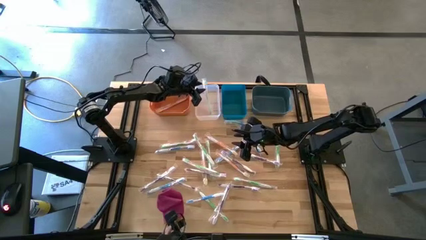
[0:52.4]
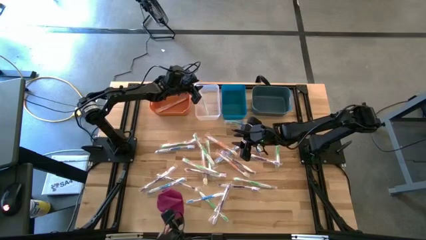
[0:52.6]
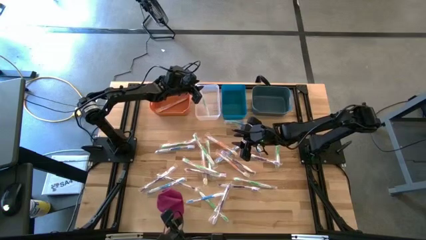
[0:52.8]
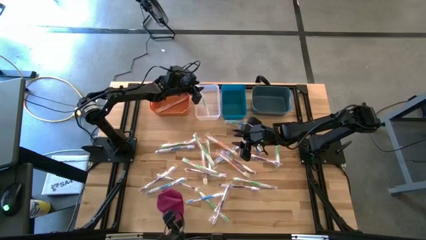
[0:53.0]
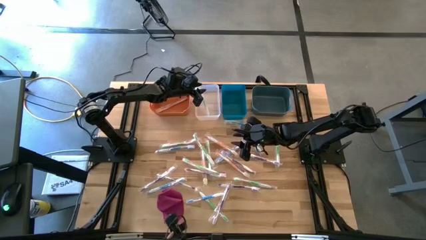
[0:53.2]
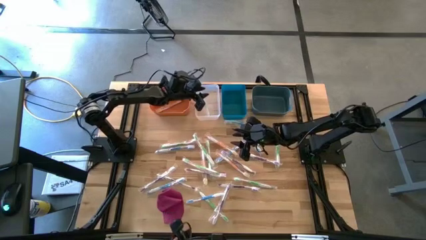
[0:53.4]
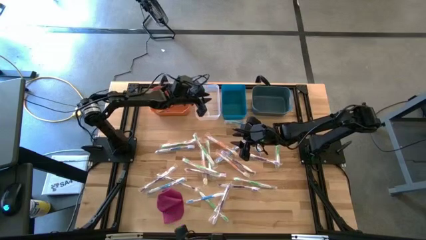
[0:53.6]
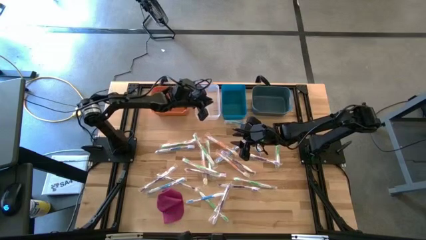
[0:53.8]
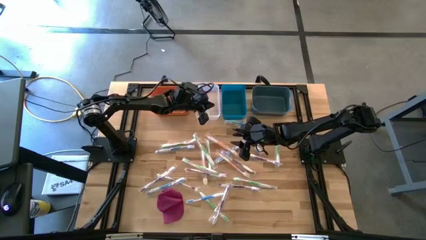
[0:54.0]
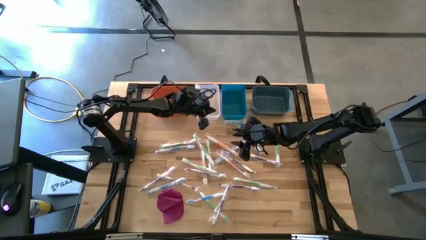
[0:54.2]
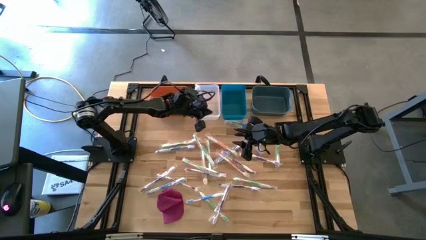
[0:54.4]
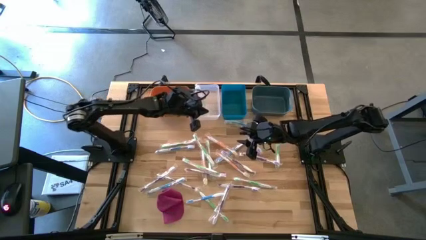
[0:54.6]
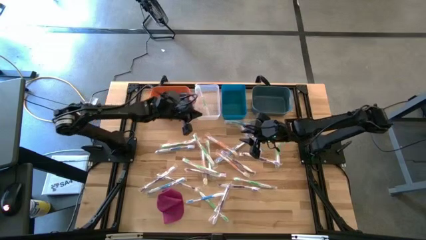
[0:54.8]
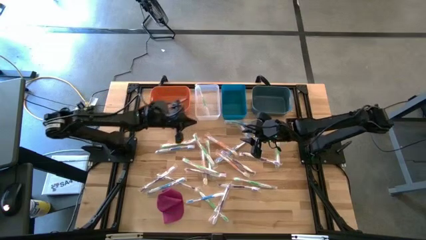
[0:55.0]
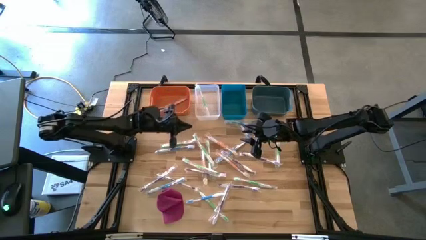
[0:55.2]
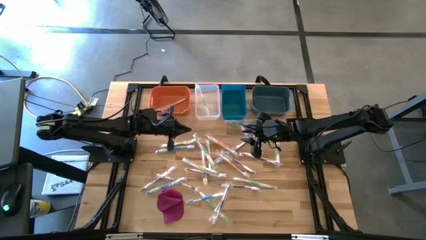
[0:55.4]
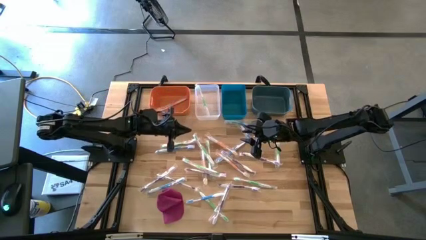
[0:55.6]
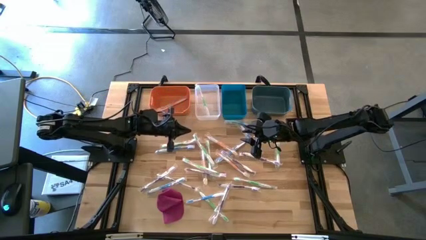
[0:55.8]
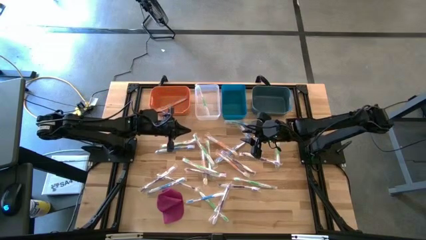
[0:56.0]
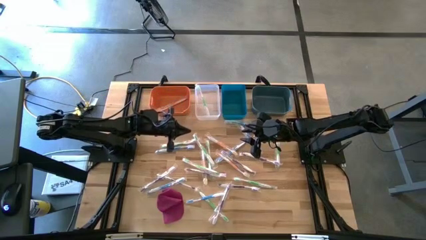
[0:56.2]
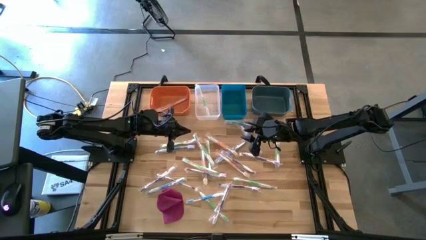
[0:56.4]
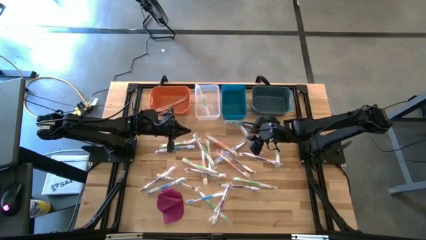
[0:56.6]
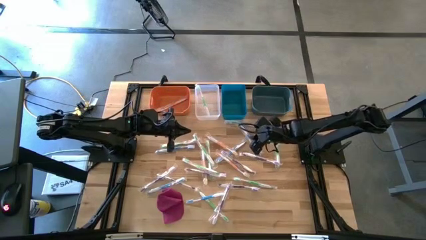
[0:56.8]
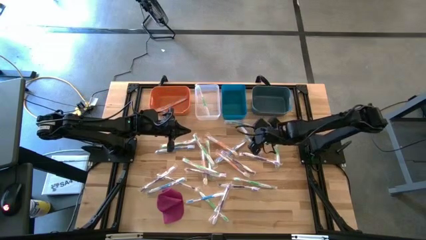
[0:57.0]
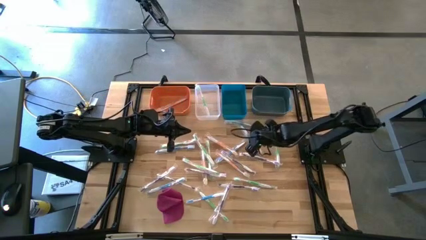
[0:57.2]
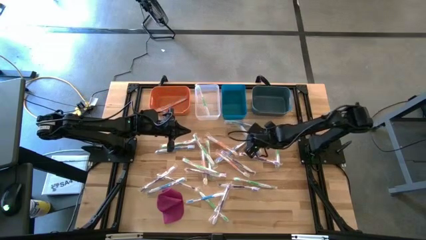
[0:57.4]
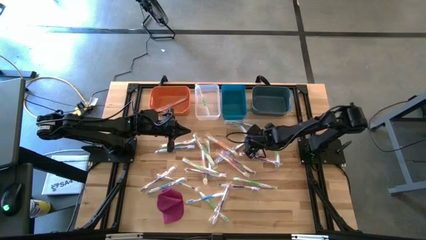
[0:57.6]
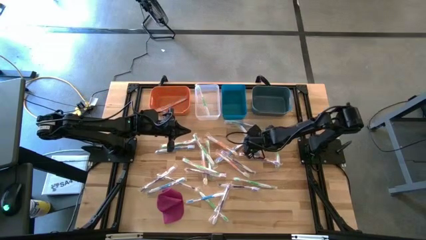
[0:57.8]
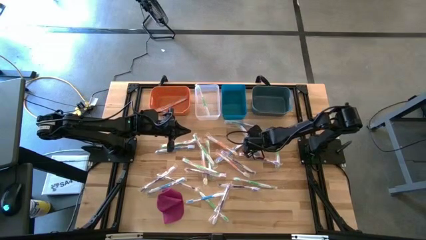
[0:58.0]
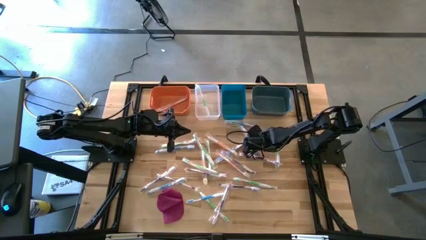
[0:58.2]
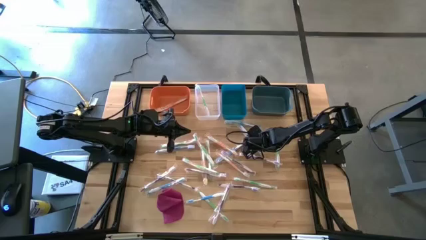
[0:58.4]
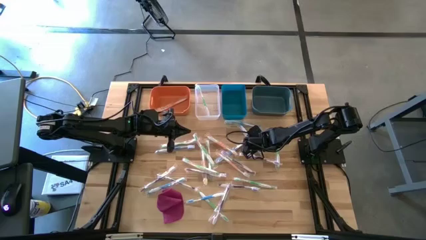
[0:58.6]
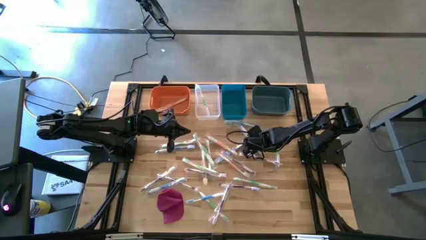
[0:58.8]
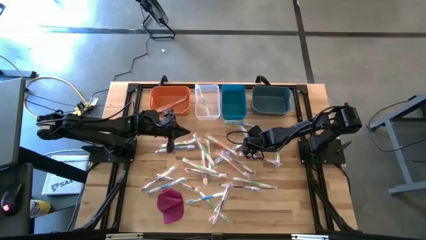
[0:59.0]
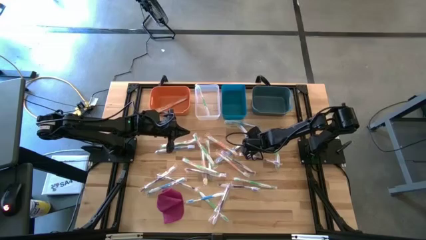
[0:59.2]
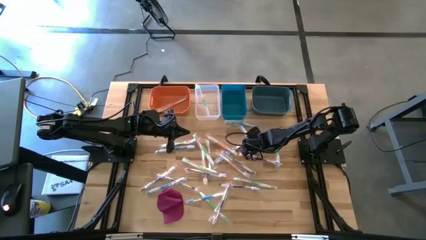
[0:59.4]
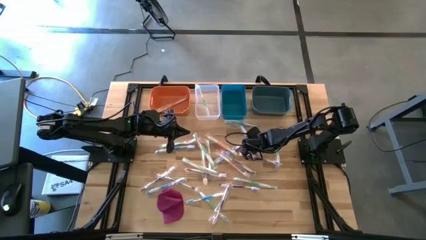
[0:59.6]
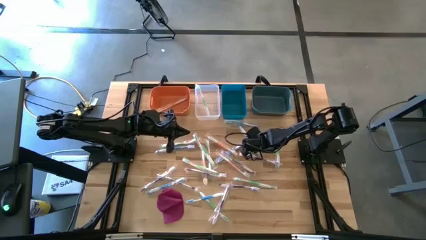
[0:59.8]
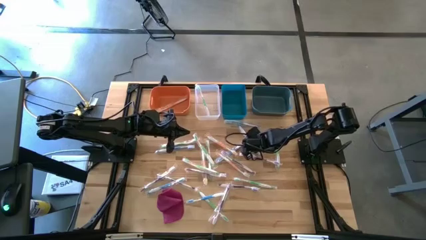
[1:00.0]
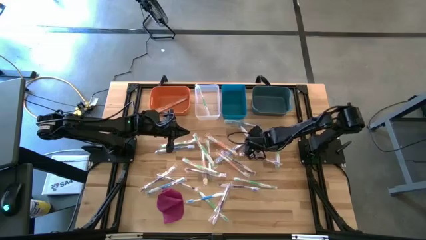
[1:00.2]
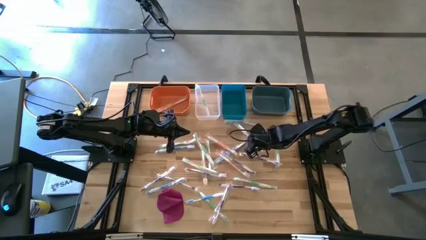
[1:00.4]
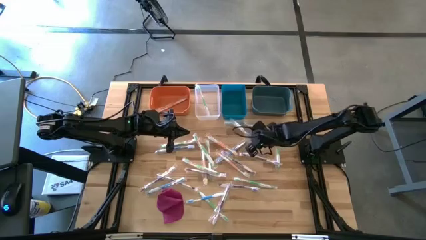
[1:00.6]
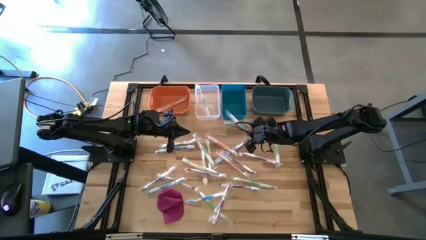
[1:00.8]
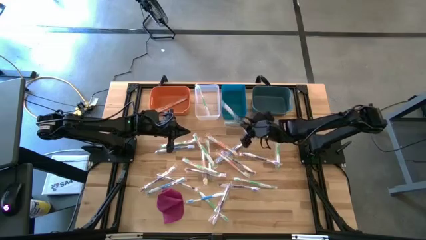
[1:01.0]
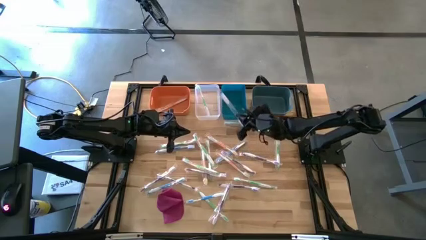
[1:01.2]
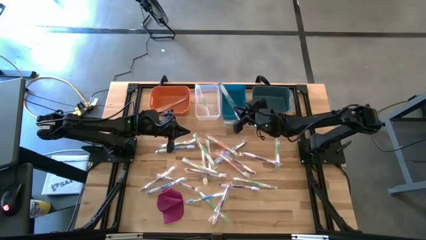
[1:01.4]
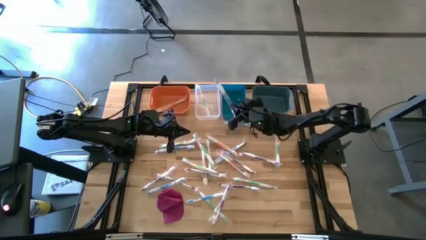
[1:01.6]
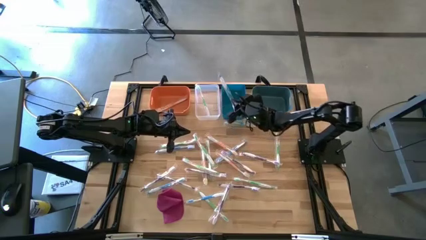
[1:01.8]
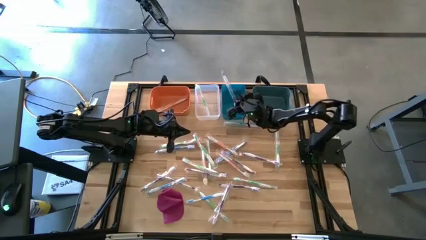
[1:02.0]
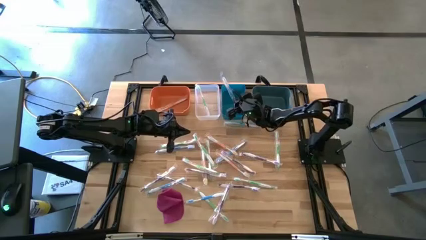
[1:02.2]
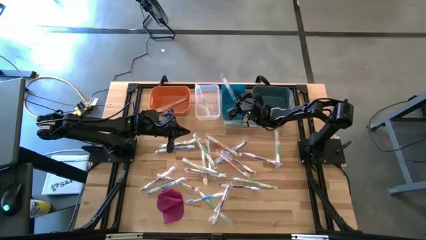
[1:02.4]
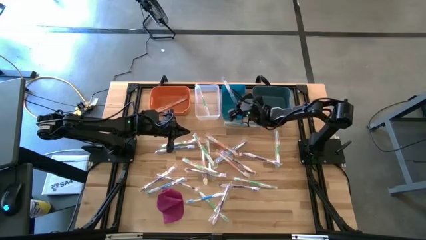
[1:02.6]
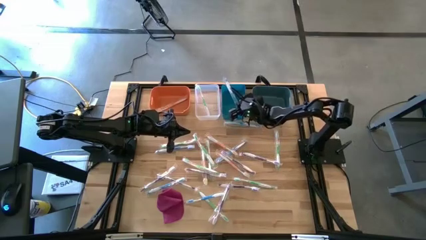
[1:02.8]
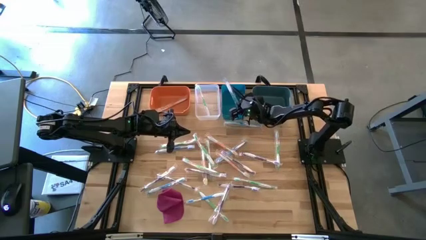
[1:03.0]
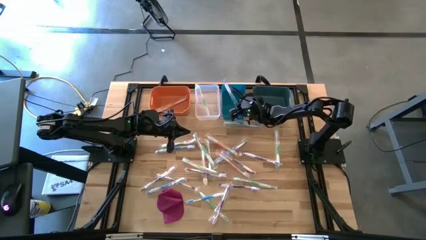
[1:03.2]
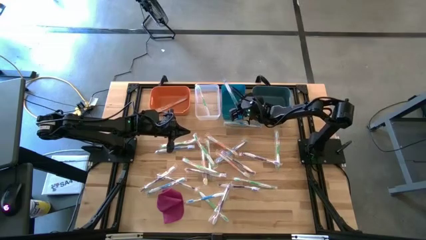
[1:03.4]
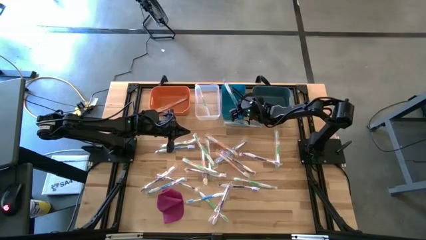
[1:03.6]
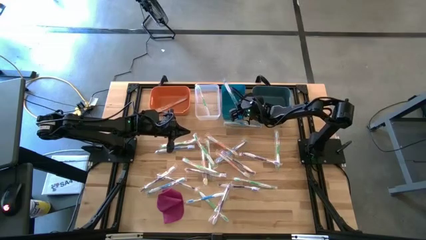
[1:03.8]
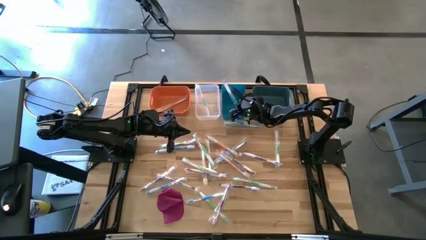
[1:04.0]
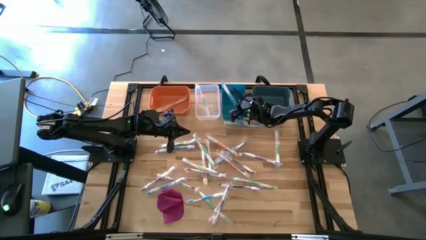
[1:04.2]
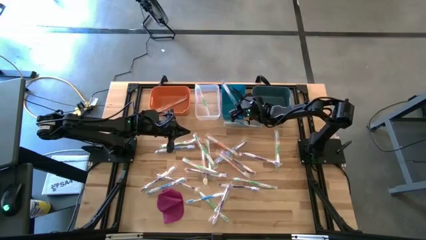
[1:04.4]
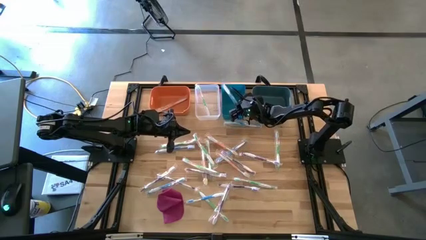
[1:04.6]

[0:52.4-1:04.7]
Task: Pick & Place Toothbrushes
Put the blue toothbrush into the blue bin
